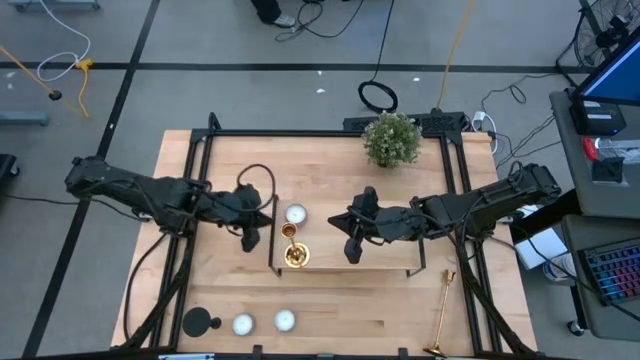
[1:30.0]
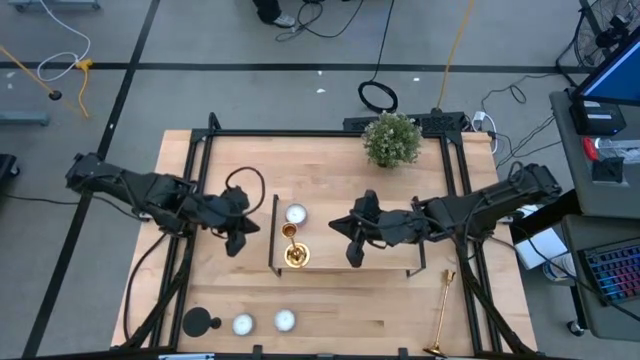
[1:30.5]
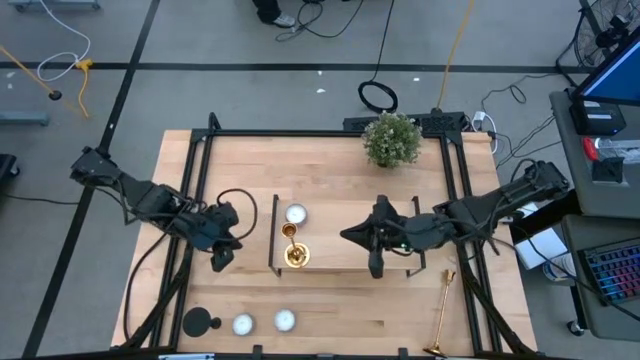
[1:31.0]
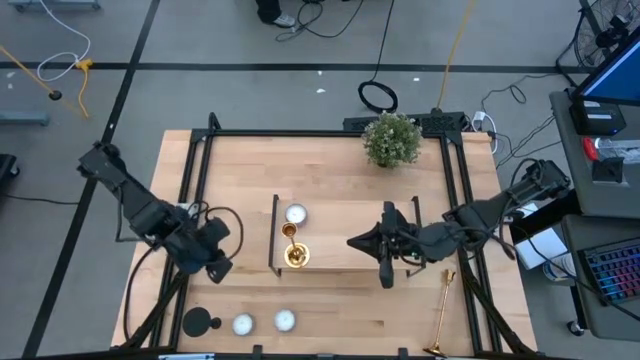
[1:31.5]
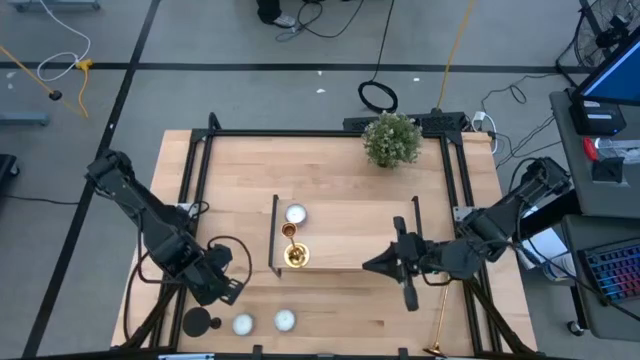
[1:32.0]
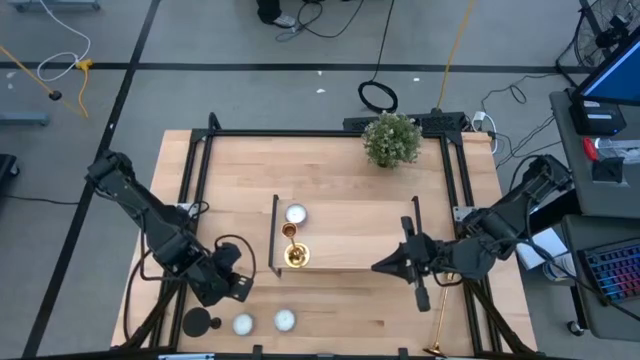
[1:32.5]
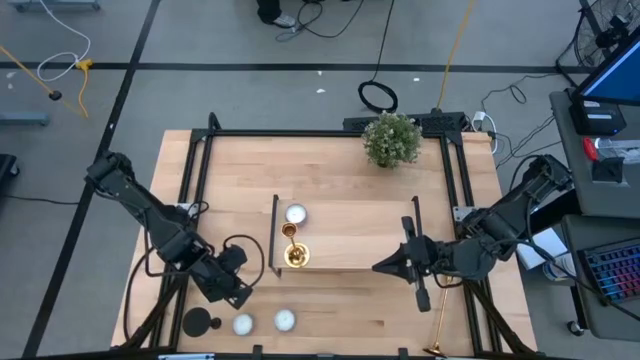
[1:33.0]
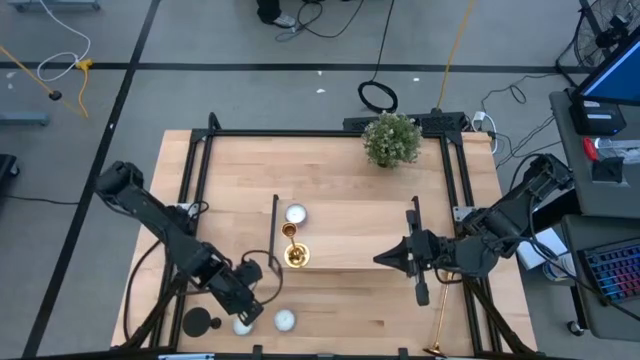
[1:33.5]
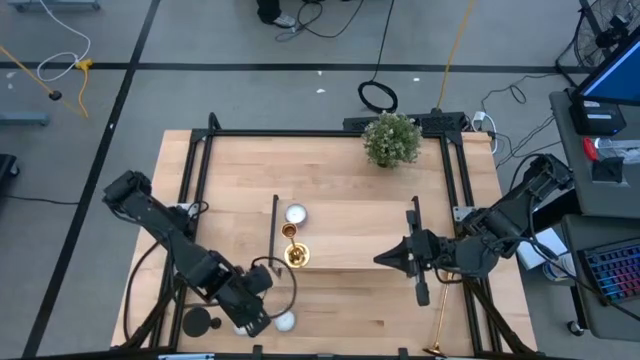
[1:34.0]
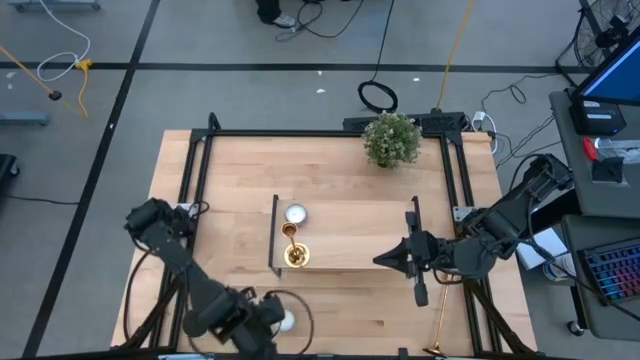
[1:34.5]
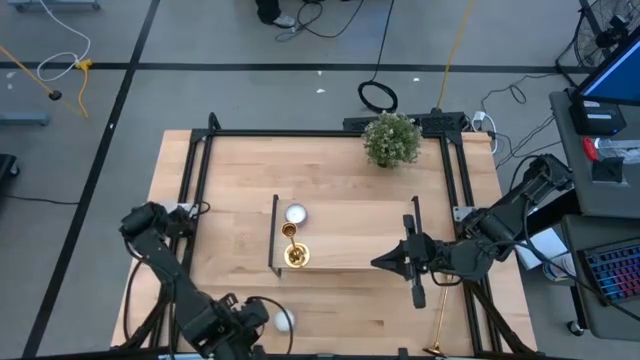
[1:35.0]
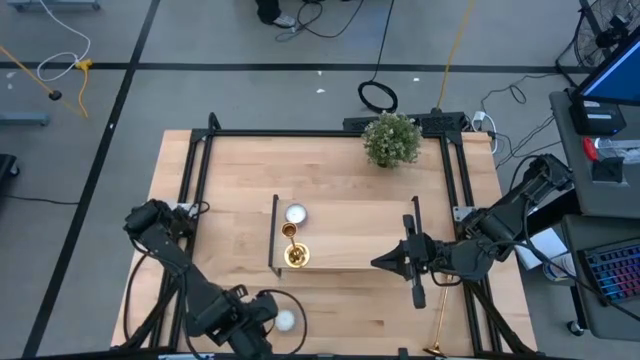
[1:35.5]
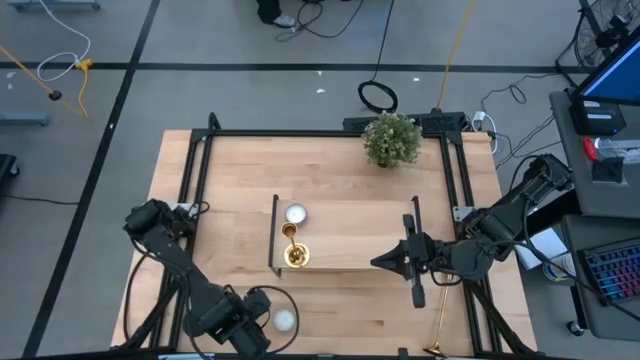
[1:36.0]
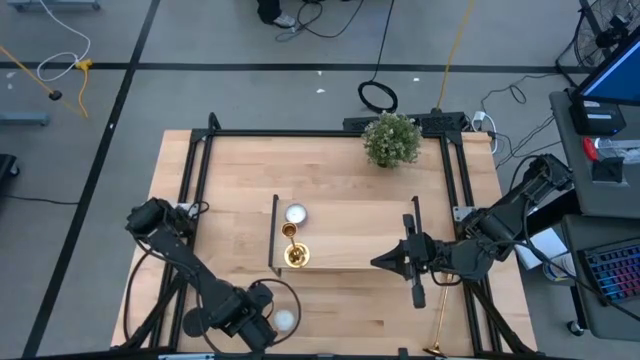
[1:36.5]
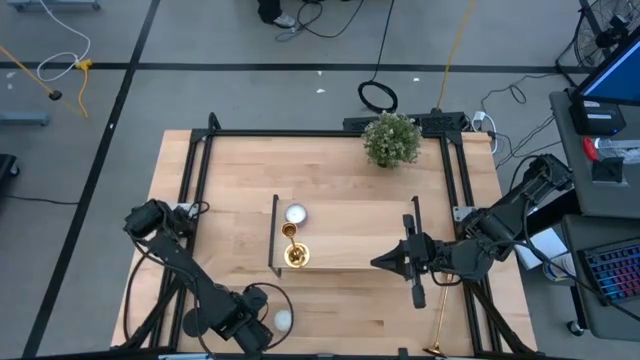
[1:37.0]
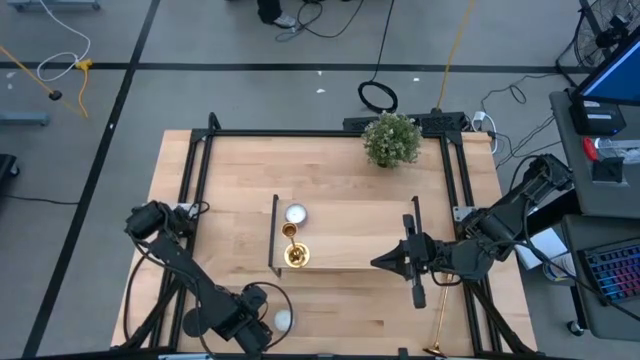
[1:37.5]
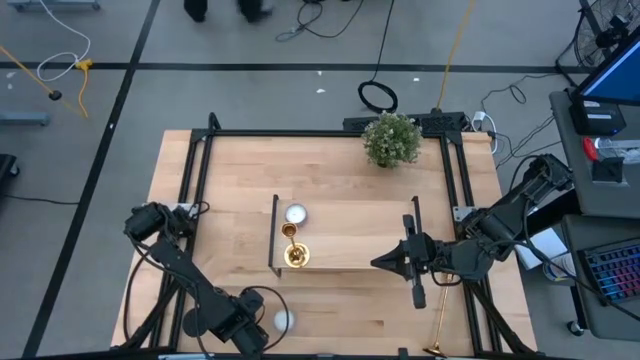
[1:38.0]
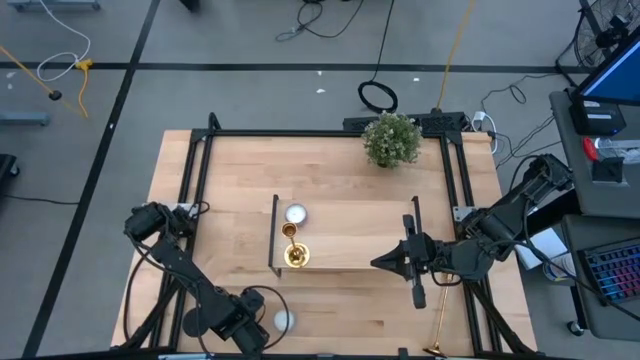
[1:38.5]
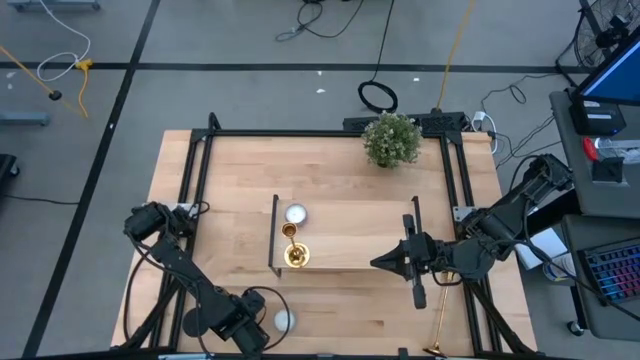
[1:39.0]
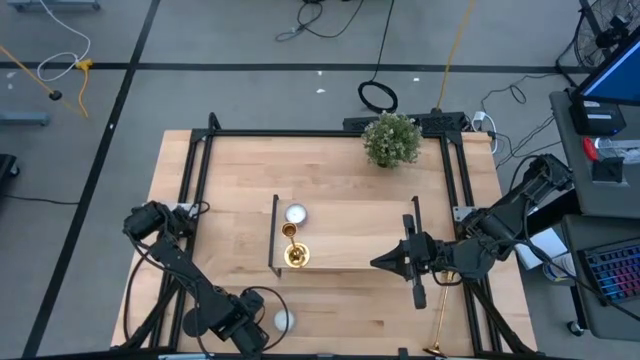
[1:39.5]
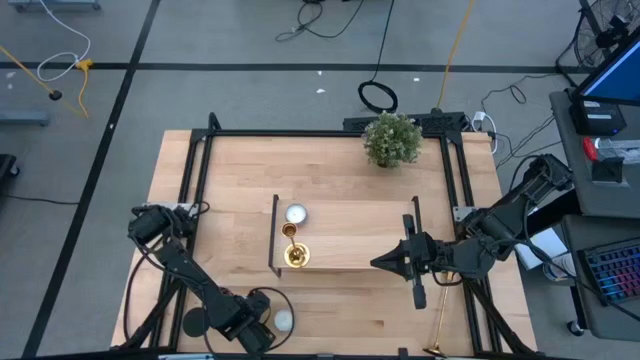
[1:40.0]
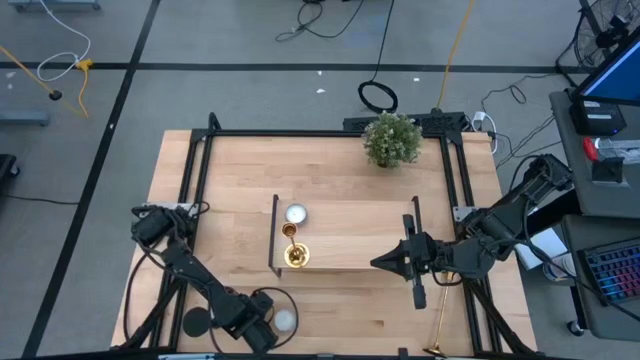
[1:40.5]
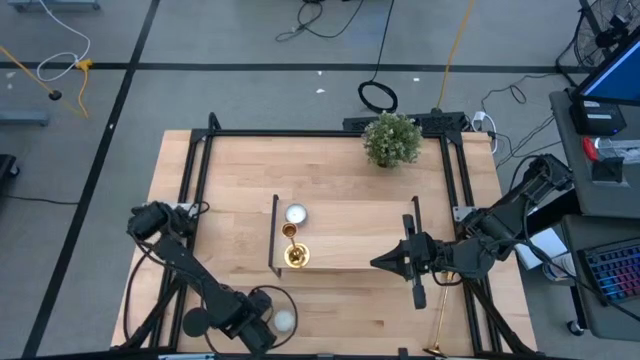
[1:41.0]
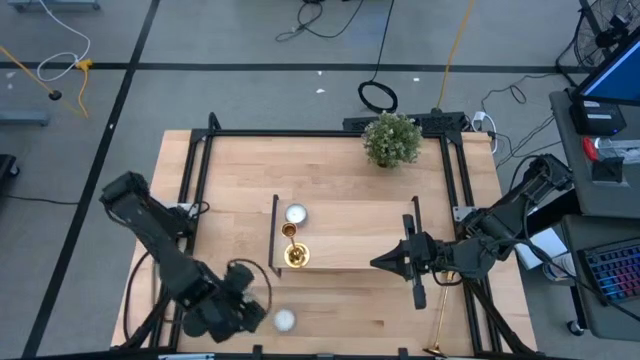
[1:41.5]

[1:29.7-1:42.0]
Task: Pick & Place candle stick holders
Put the white blue scented candle on the shelf

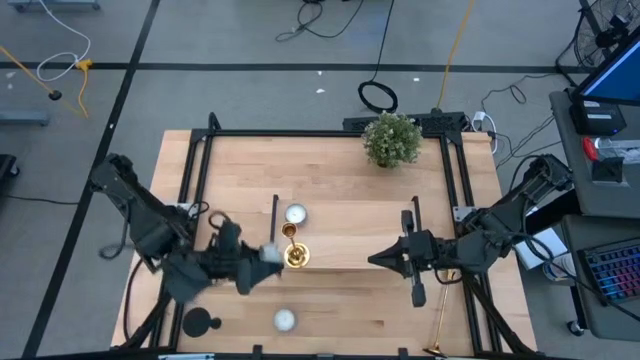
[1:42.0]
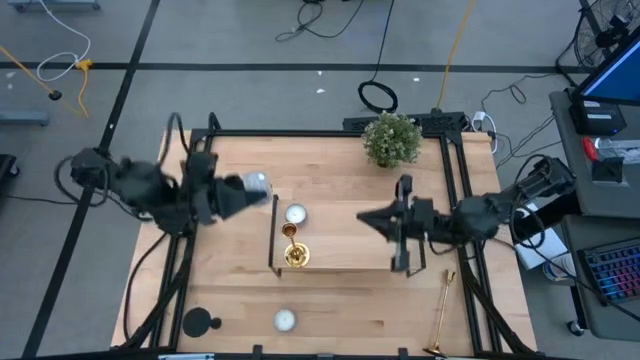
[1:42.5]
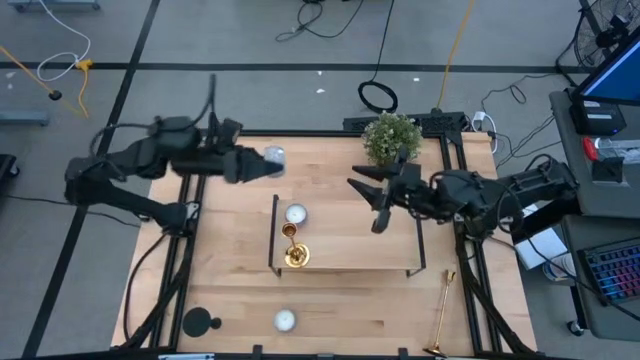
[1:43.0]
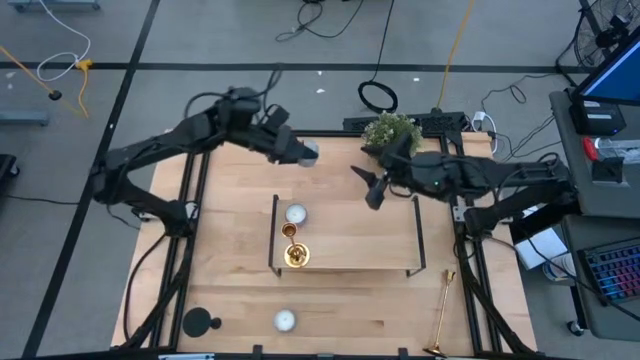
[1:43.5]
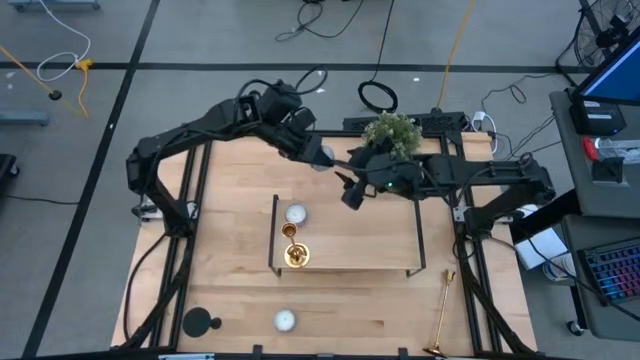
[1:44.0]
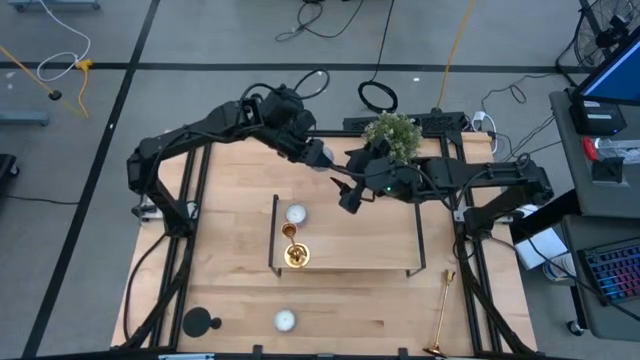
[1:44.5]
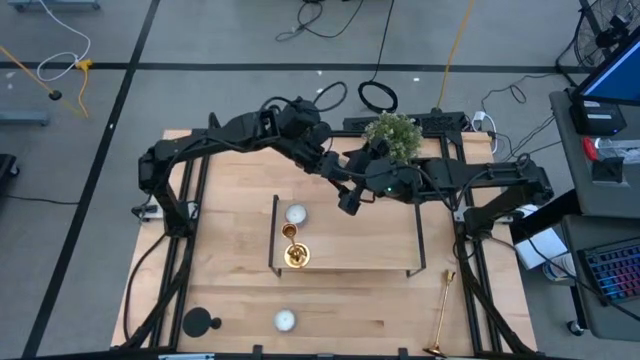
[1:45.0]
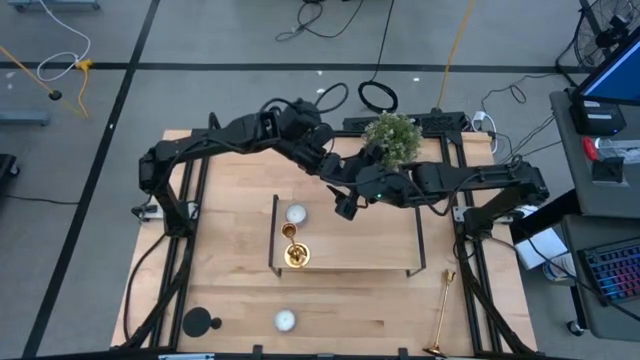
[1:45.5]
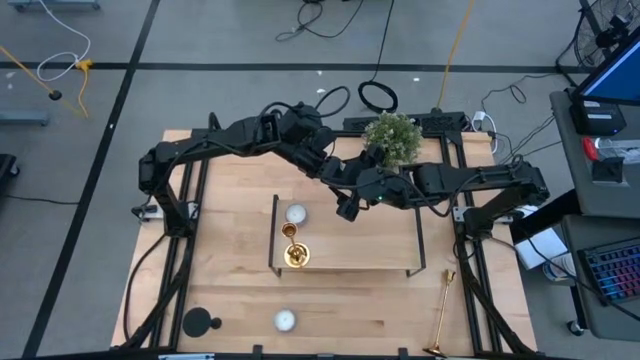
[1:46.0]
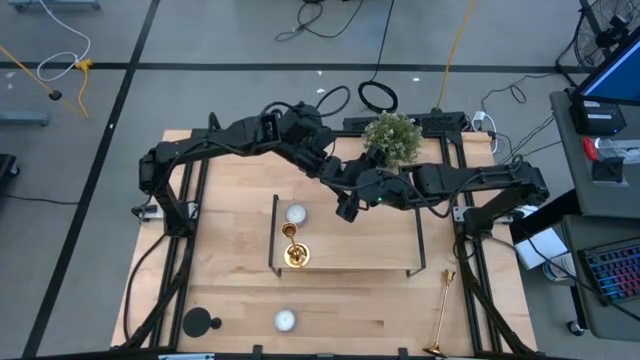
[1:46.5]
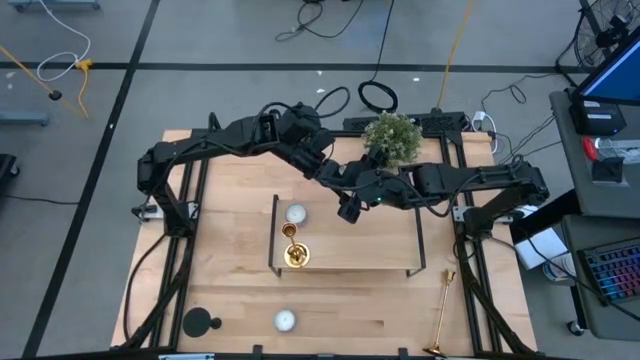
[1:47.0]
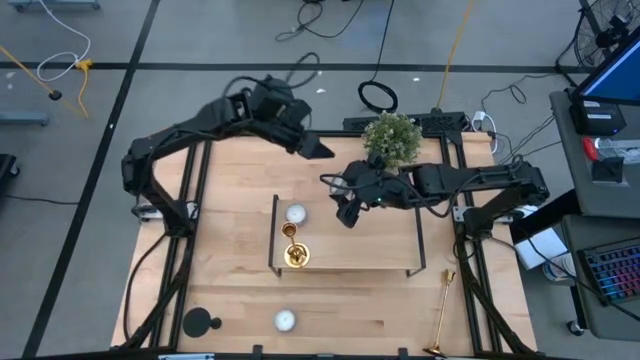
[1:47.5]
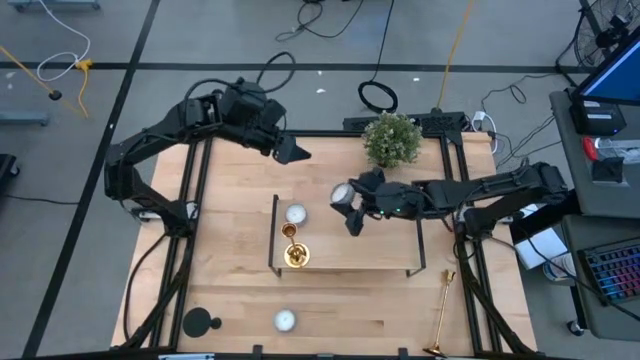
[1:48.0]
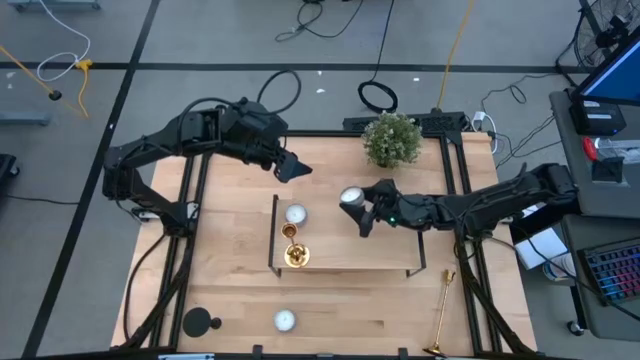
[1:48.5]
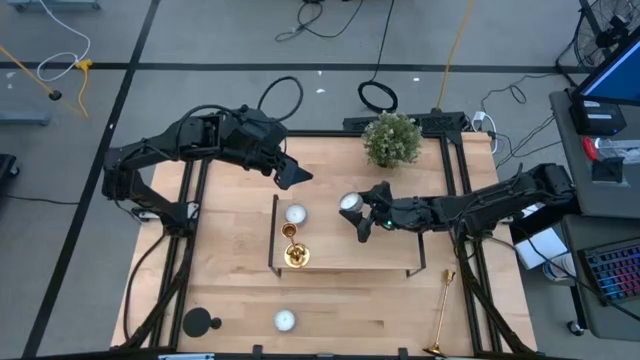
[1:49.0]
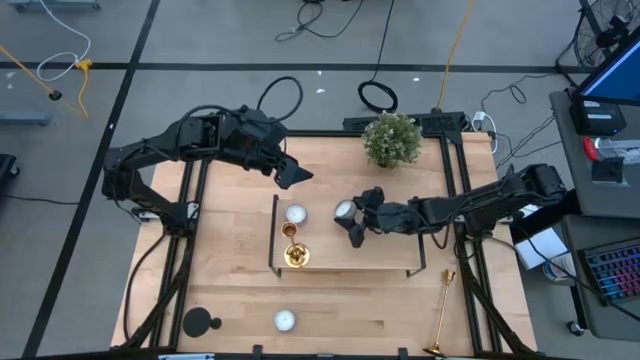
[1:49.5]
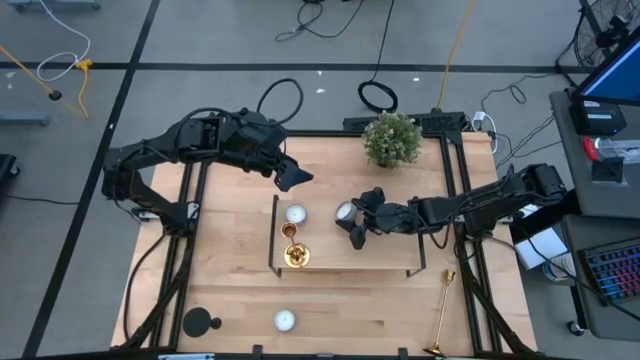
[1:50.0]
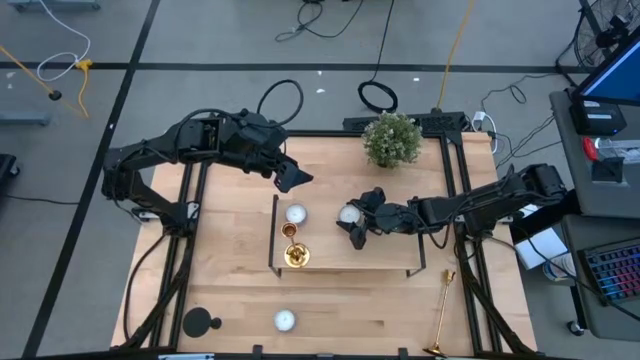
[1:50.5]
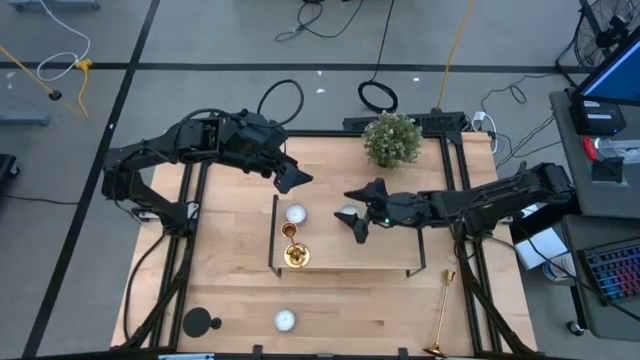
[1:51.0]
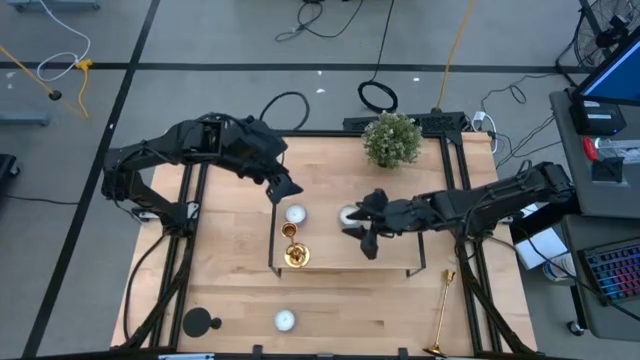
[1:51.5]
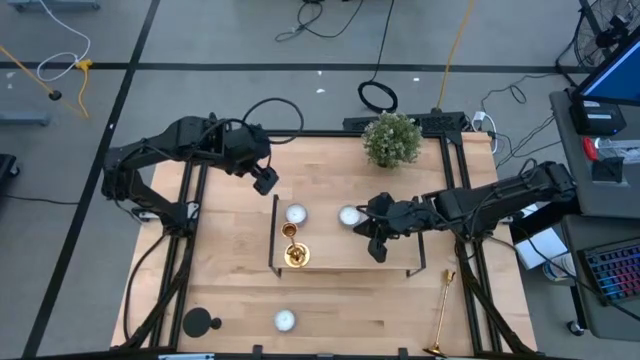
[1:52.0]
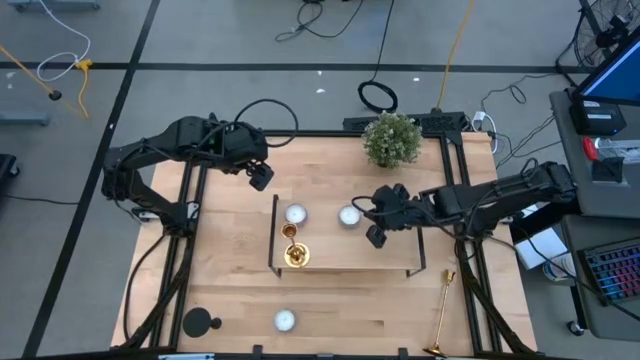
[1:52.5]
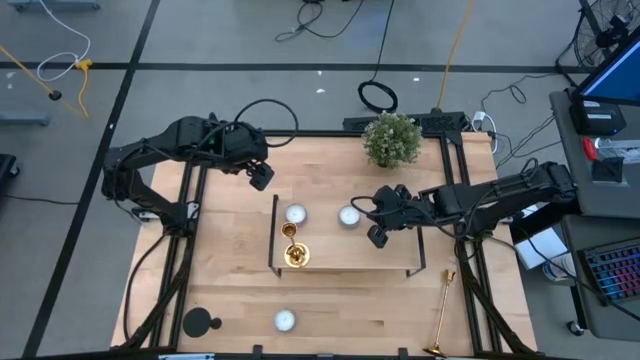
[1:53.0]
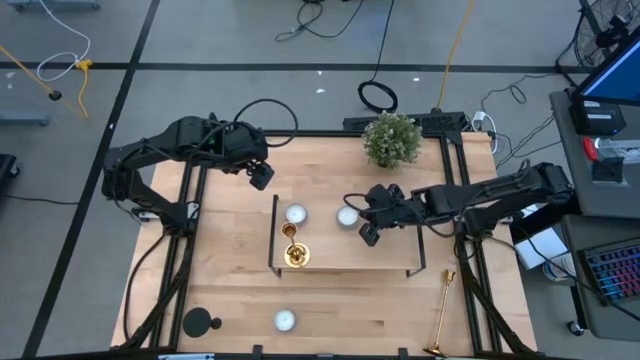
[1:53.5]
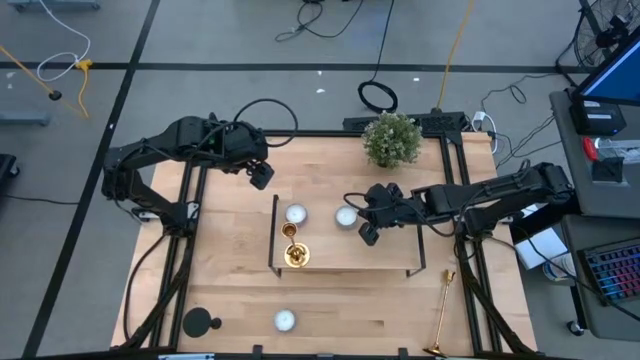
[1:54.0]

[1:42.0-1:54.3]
Put the white blue scented candle on the shelf
